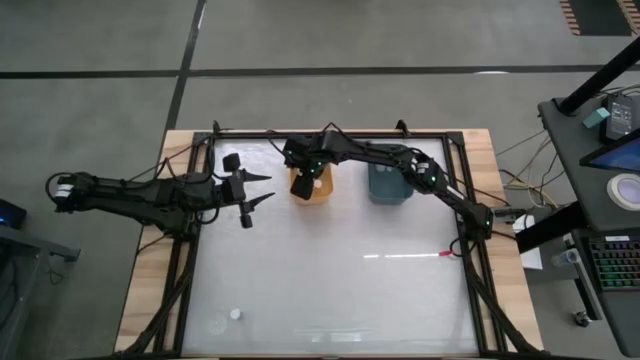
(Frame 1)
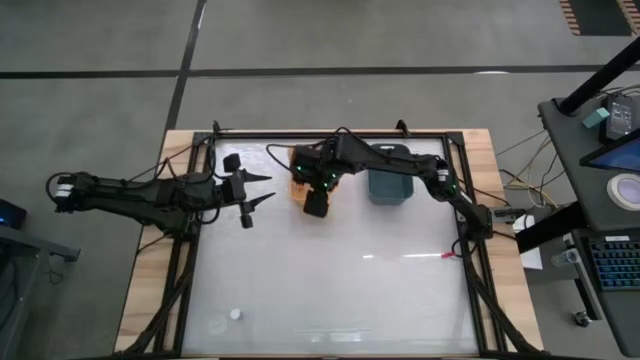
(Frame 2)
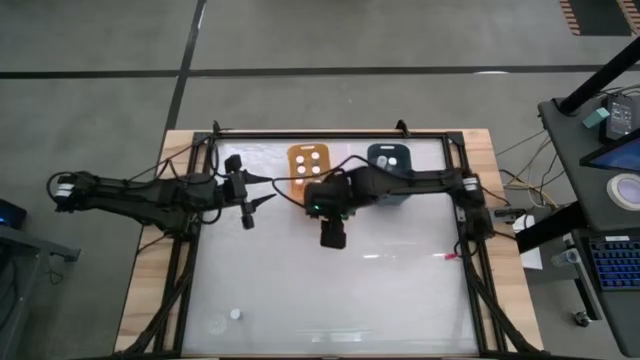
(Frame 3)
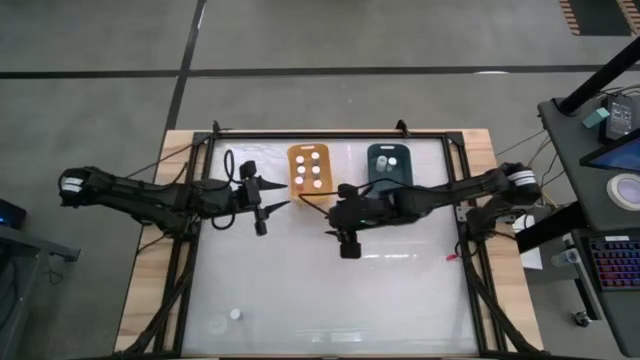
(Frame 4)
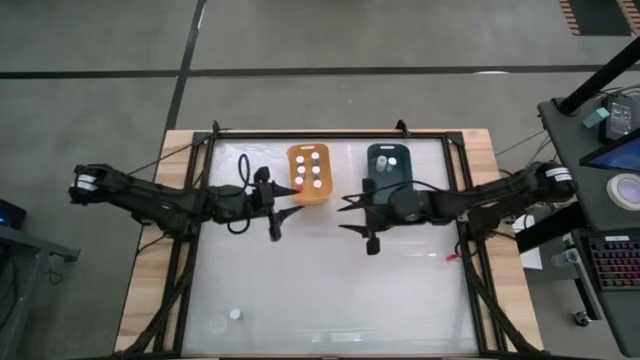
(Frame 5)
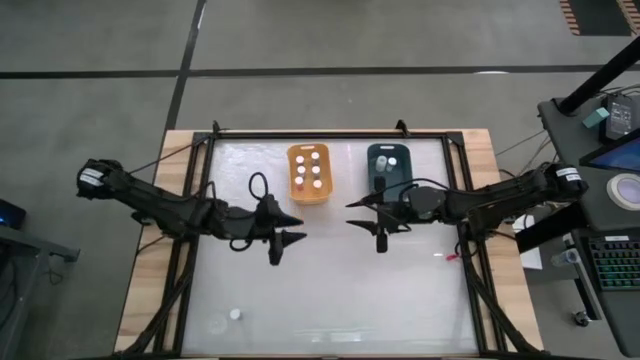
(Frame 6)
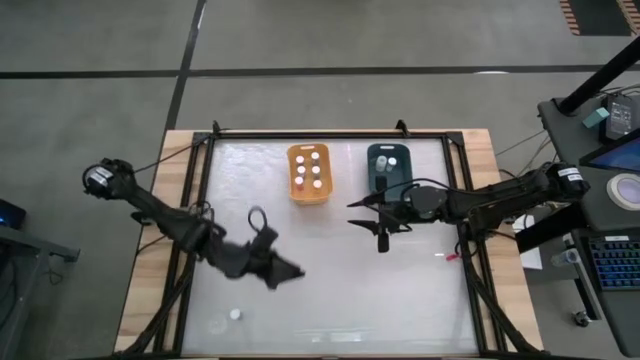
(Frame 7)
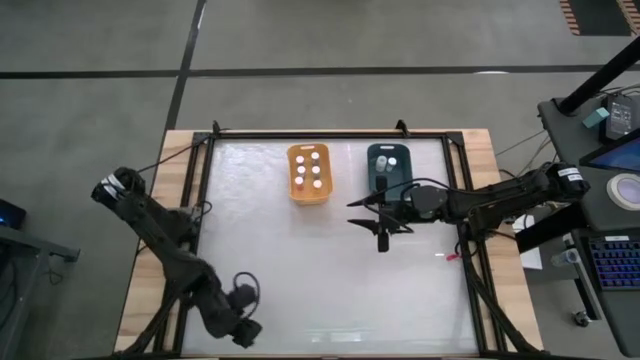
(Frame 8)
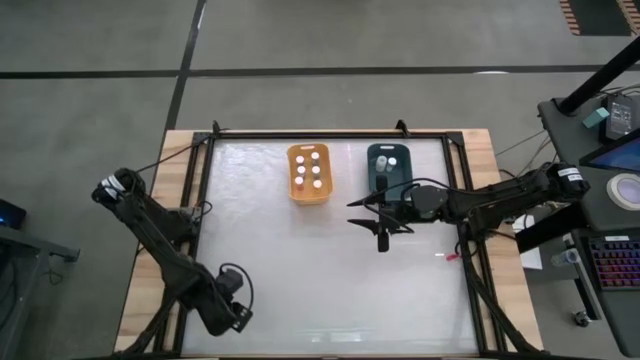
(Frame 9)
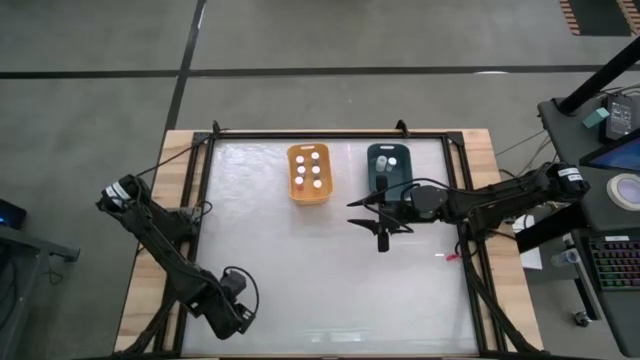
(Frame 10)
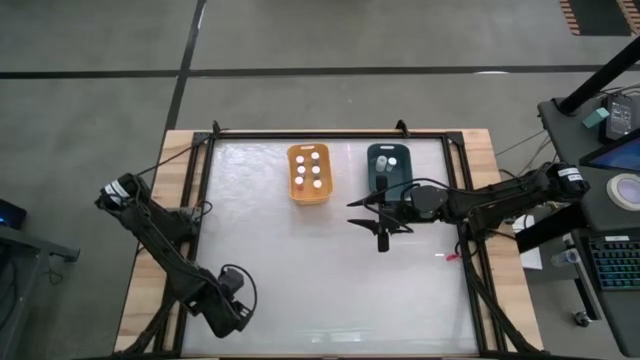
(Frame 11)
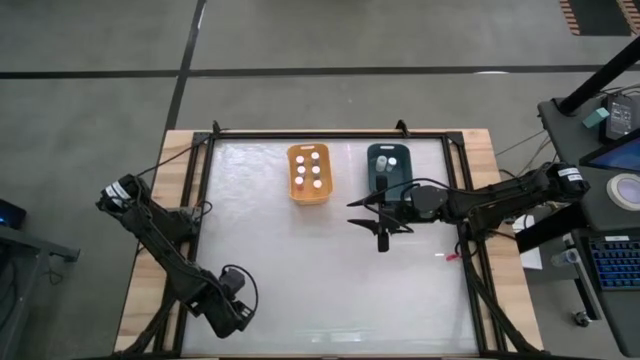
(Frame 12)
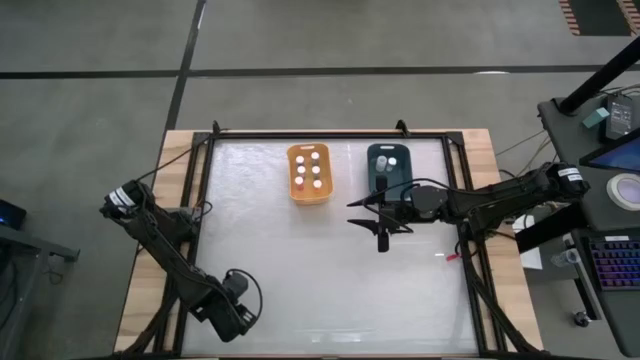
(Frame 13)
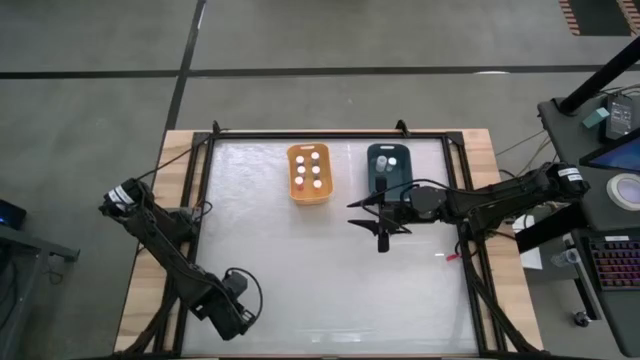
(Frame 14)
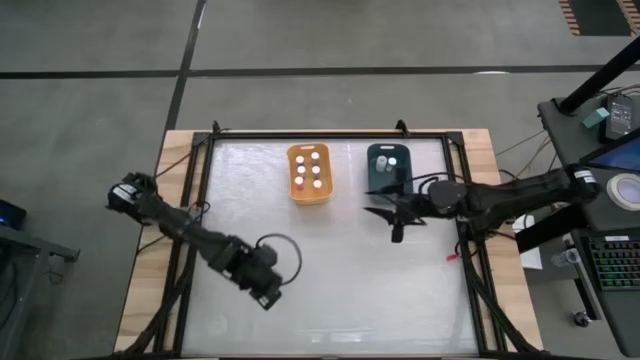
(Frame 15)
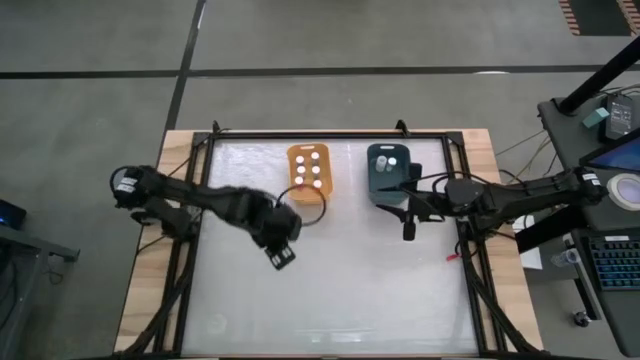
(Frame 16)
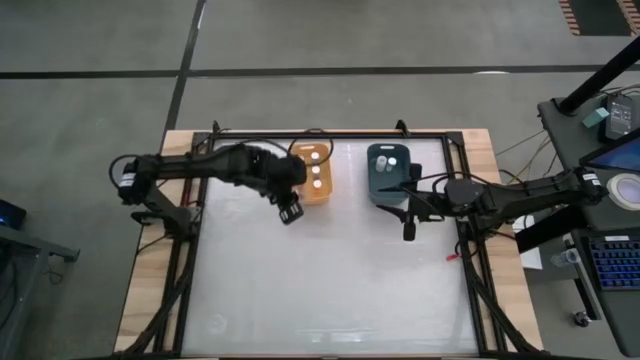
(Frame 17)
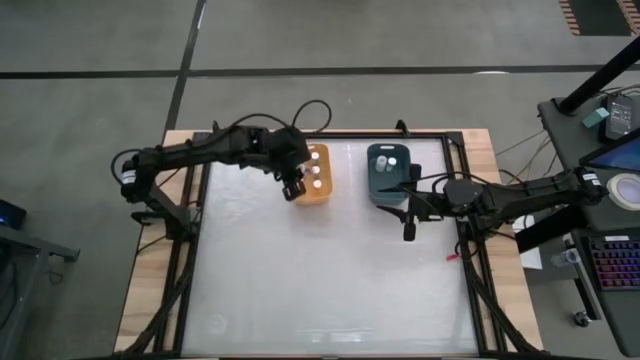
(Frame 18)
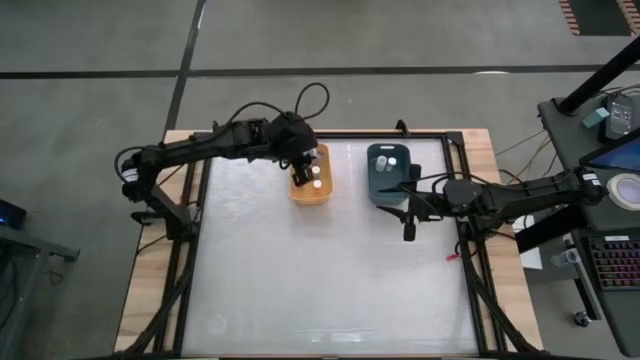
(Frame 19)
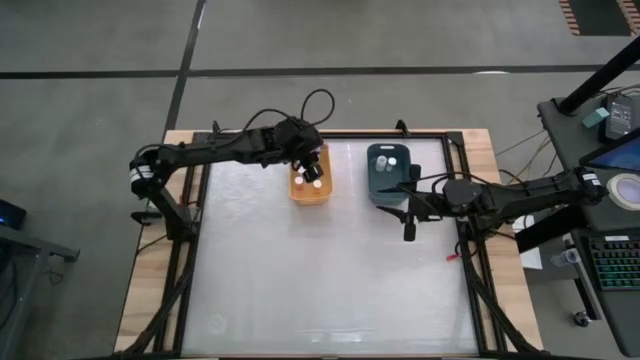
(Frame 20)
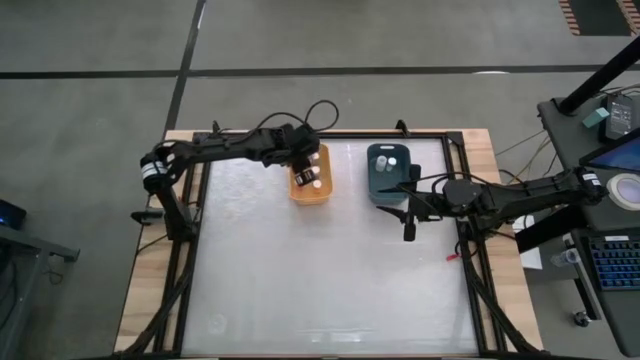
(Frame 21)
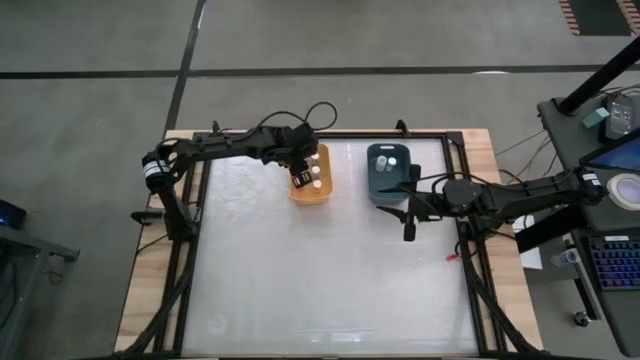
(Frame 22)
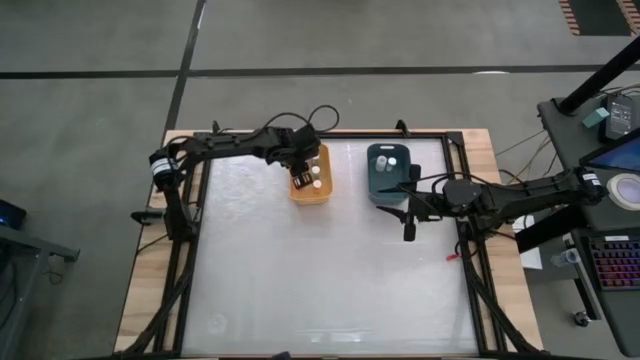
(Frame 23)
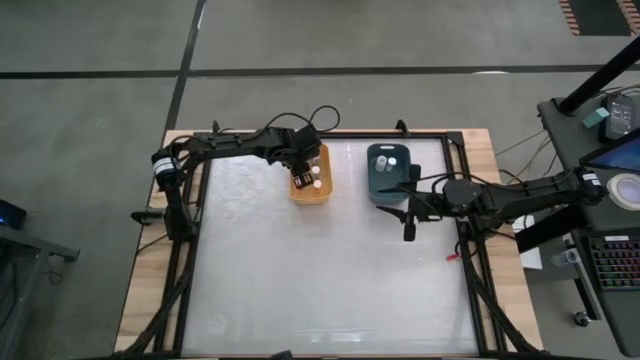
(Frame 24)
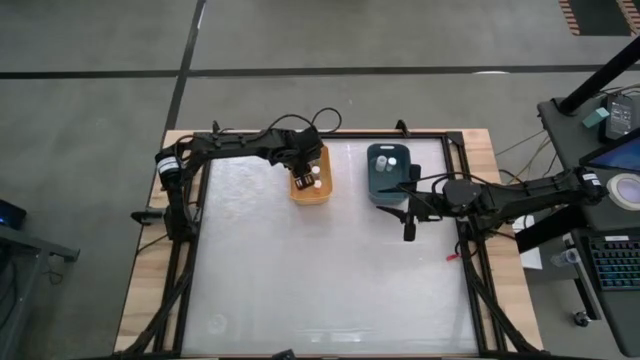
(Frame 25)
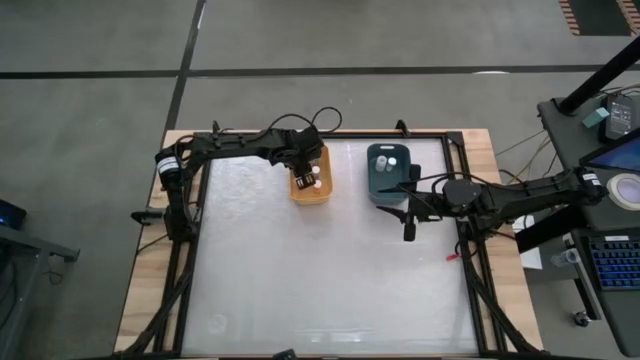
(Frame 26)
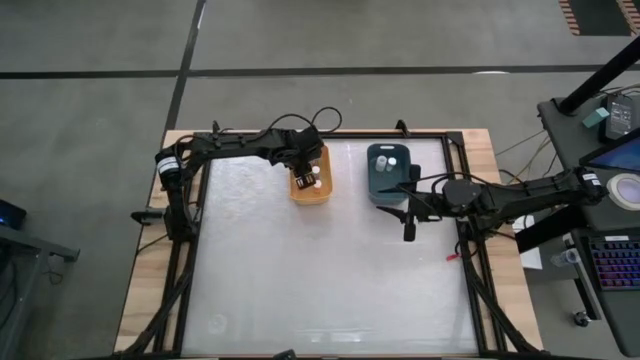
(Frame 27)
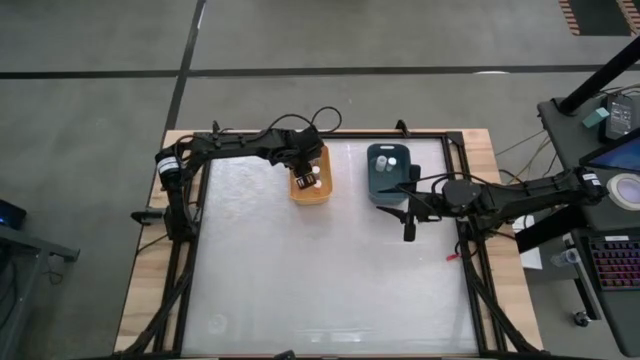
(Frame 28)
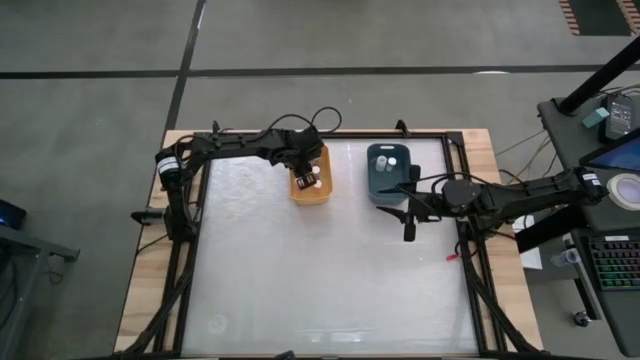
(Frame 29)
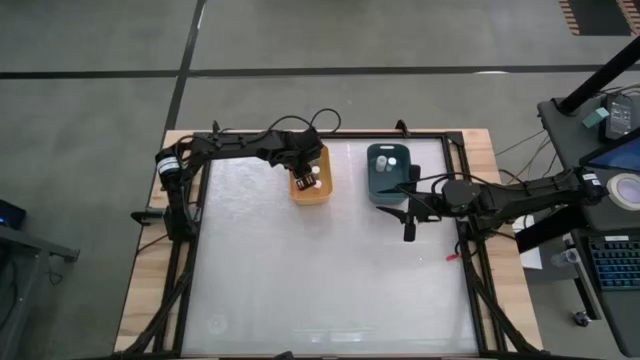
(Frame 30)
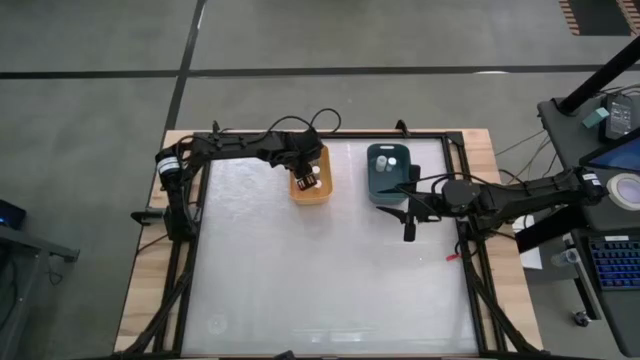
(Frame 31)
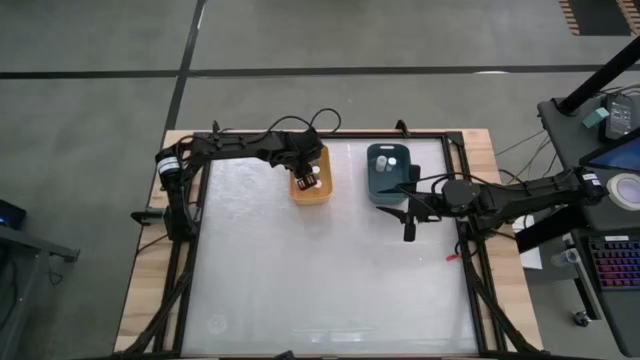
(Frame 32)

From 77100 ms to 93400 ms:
Task: Pick and place medicine bottles into bin by pill shape (circle, oval)
Put the blue capsule bottle into the yellow bin

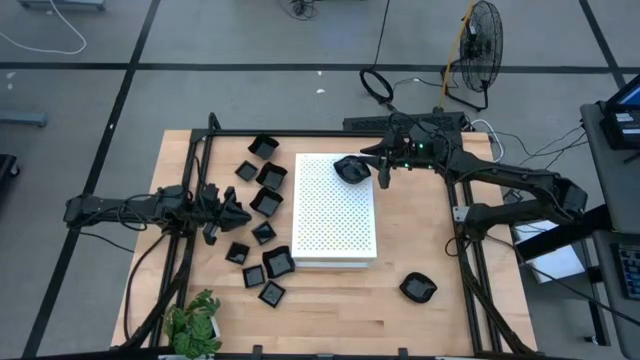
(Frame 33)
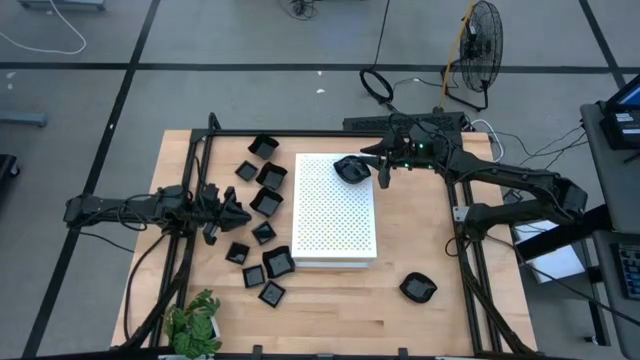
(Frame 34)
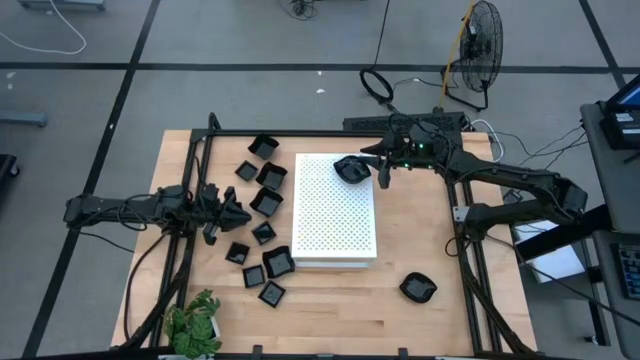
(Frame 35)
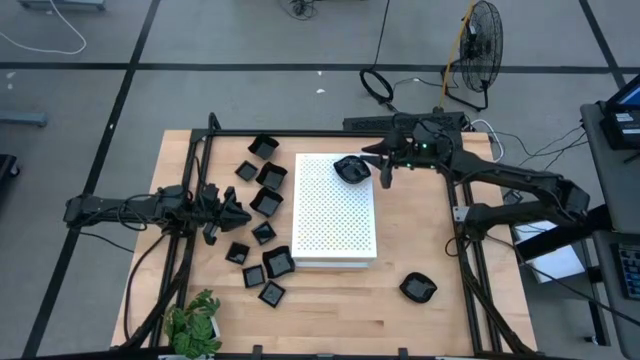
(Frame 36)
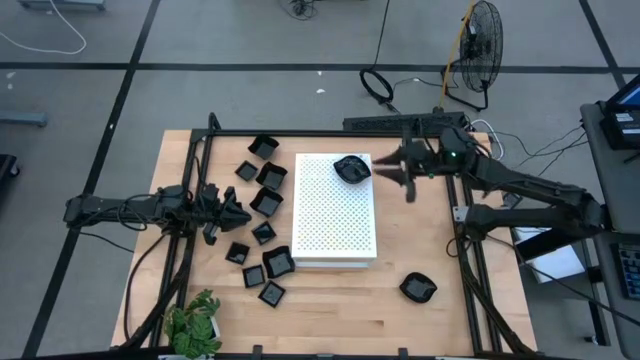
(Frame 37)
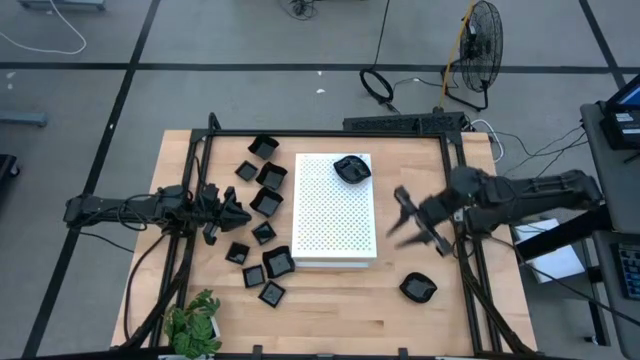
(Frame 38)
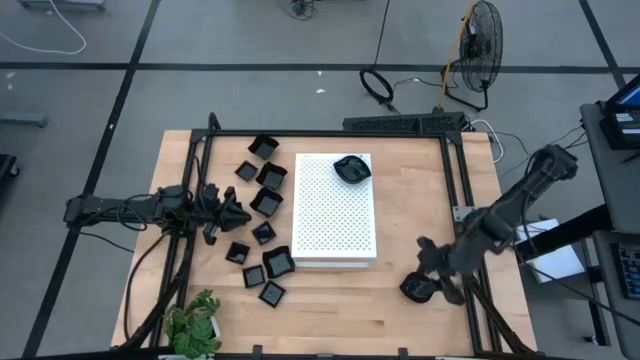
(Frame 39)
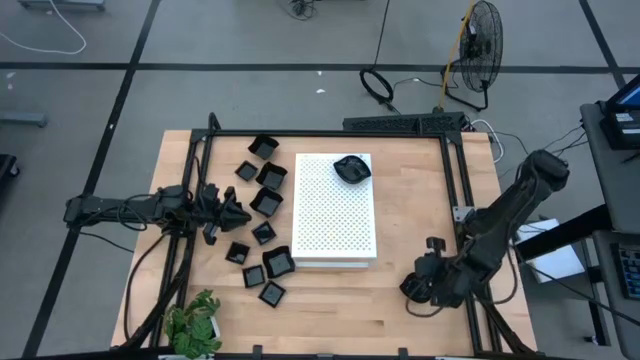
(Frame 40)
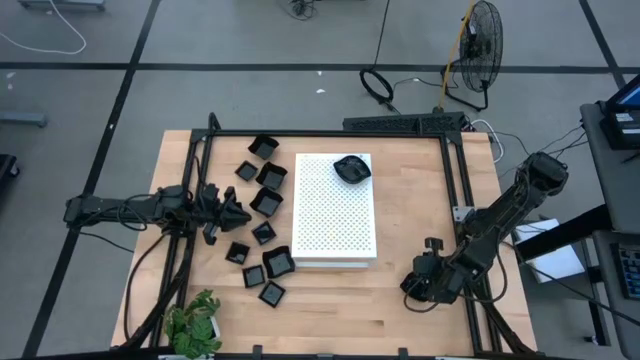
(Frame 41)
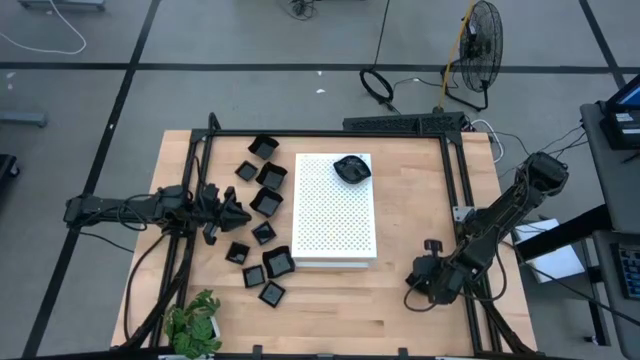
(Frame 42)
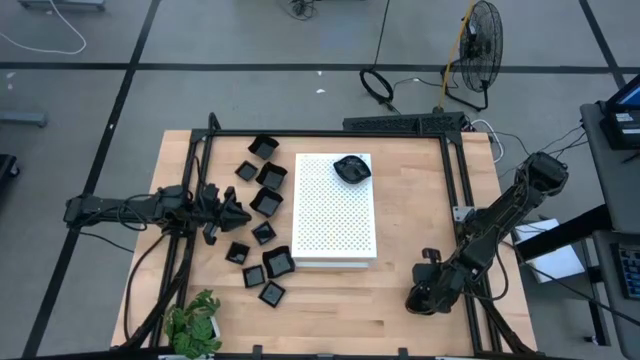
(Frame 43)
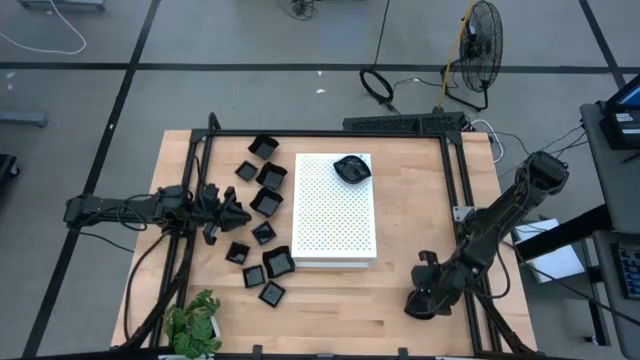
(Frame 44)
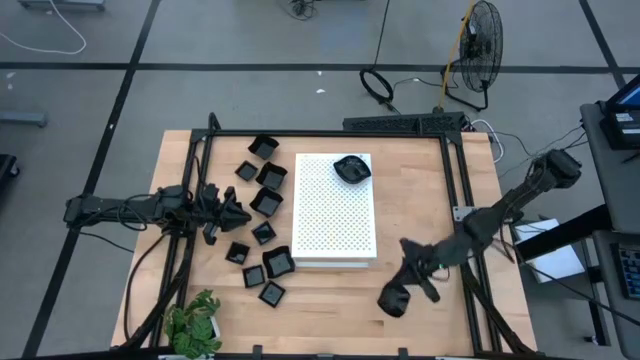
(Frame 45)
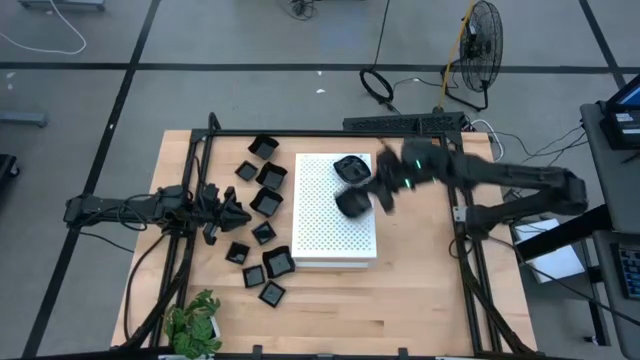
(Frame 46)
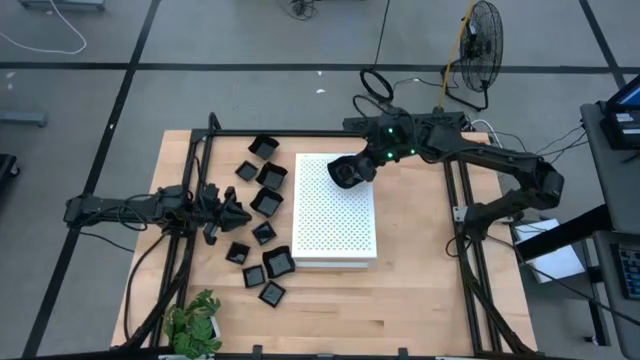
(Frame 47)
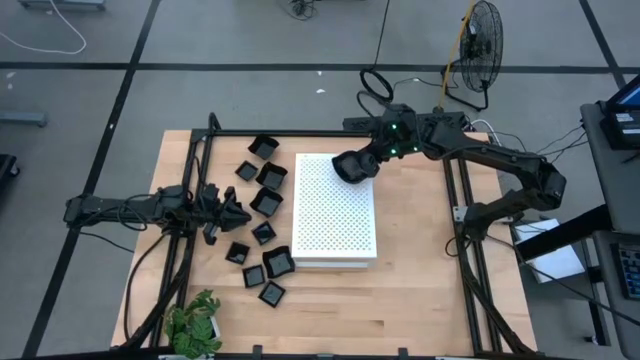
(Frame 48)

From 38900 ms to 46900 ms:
Task: Pick & Place Mini shaped plates
Stack the black leaf shaped plate on top of the other black leaf shaped plates on the shelf
